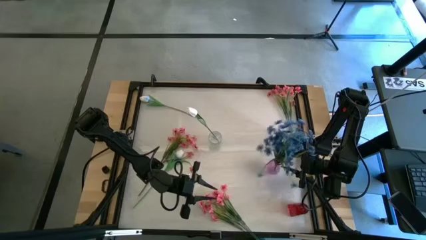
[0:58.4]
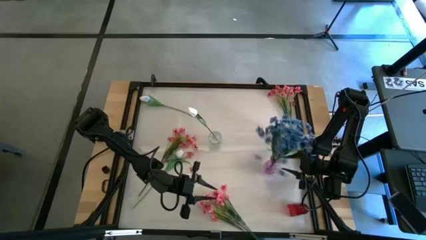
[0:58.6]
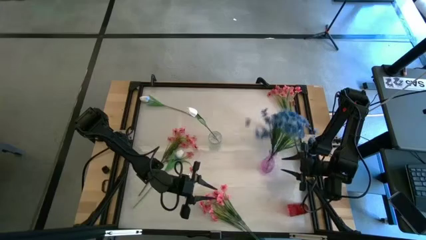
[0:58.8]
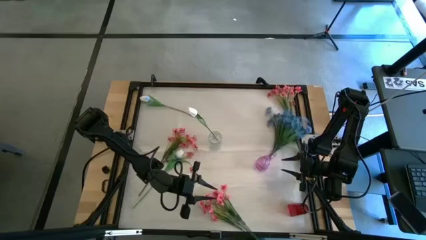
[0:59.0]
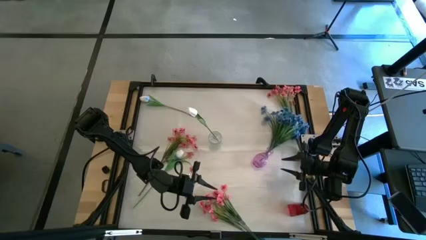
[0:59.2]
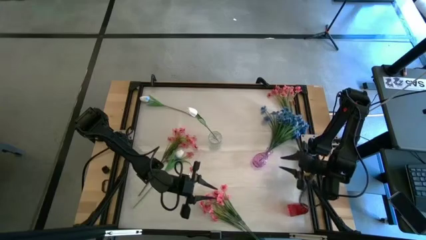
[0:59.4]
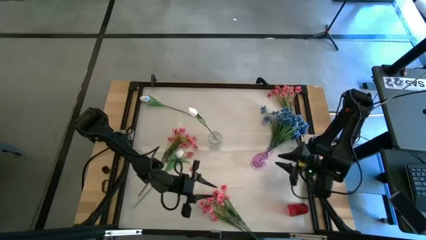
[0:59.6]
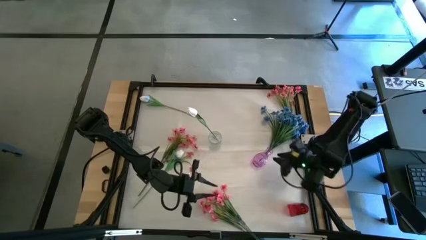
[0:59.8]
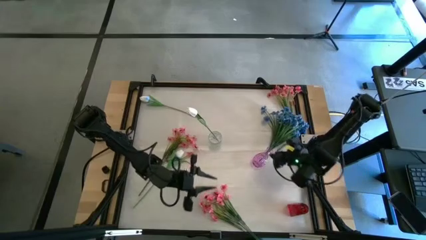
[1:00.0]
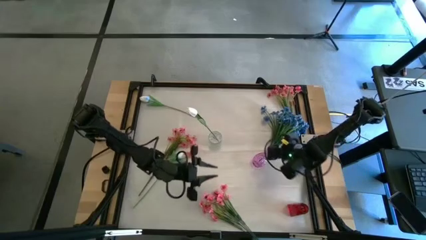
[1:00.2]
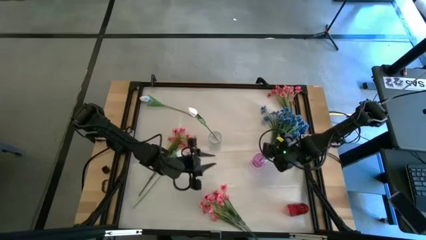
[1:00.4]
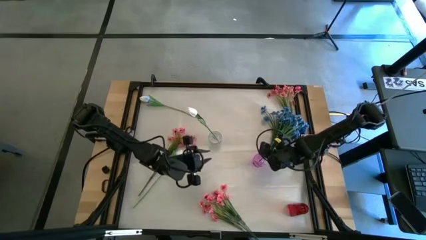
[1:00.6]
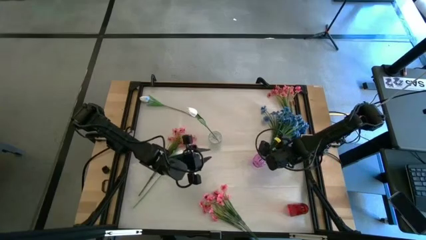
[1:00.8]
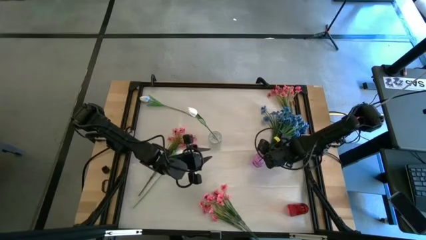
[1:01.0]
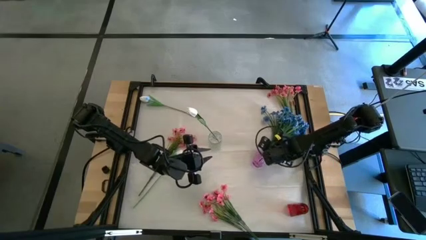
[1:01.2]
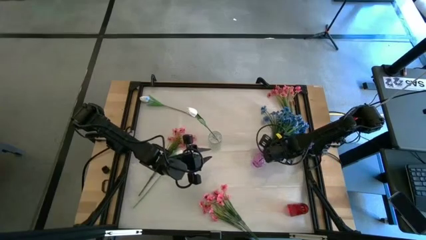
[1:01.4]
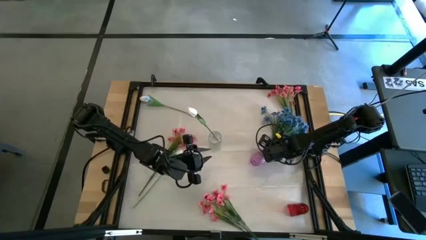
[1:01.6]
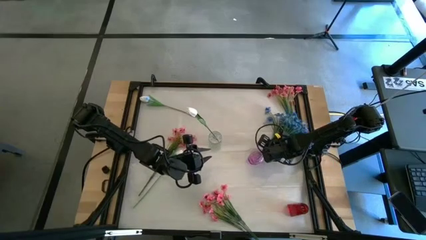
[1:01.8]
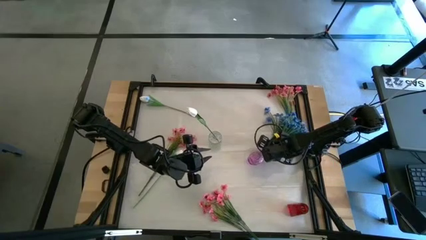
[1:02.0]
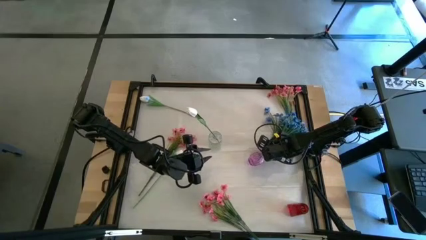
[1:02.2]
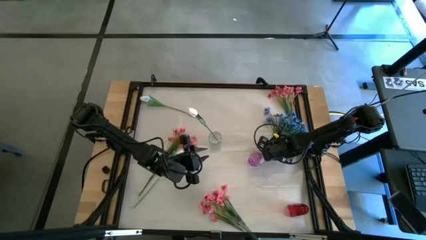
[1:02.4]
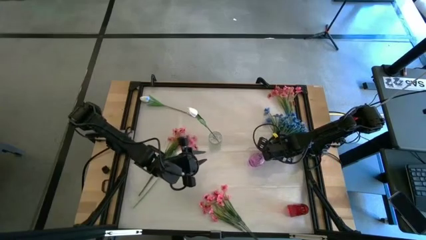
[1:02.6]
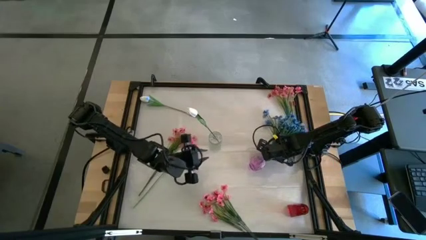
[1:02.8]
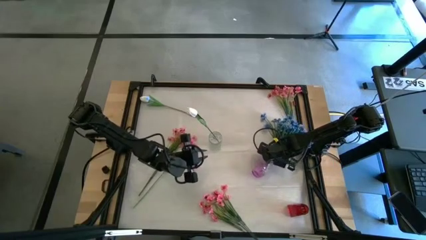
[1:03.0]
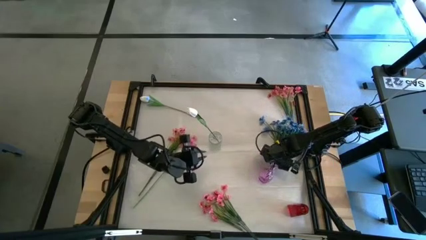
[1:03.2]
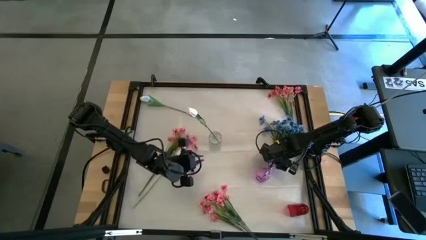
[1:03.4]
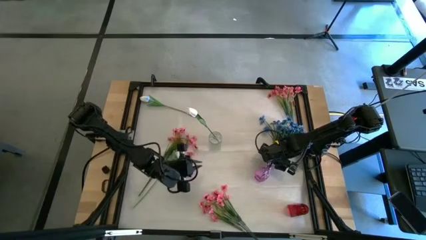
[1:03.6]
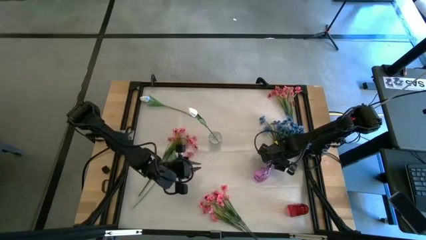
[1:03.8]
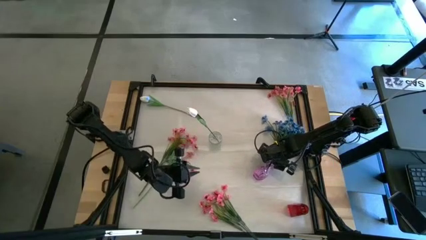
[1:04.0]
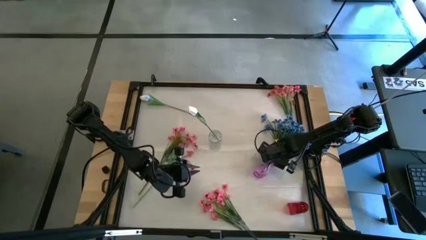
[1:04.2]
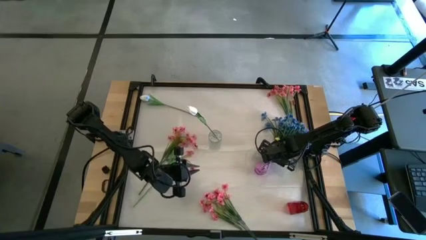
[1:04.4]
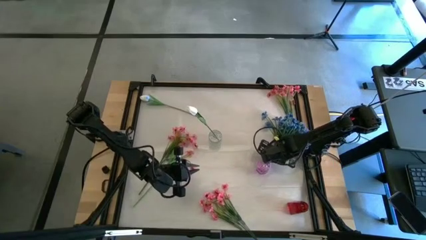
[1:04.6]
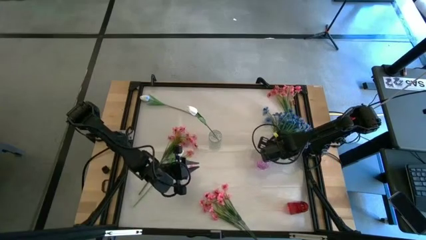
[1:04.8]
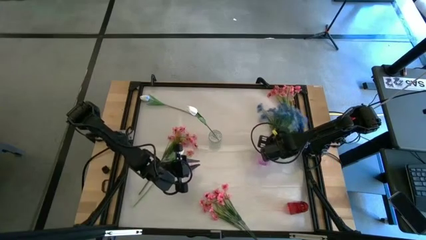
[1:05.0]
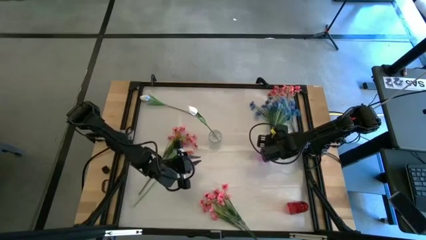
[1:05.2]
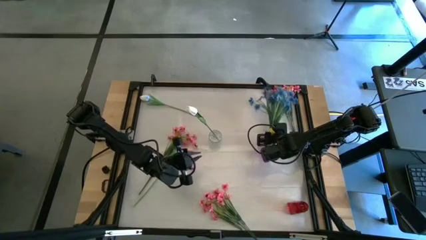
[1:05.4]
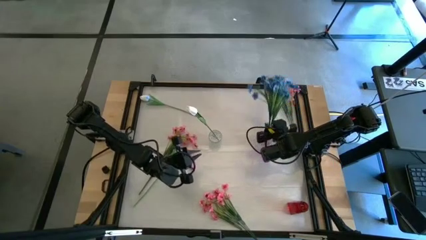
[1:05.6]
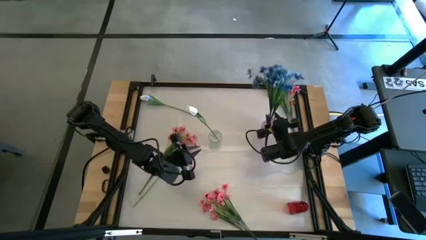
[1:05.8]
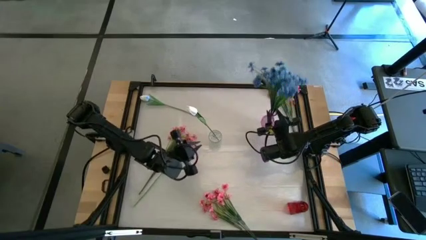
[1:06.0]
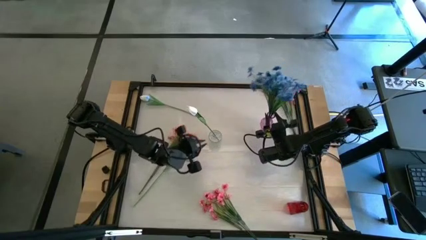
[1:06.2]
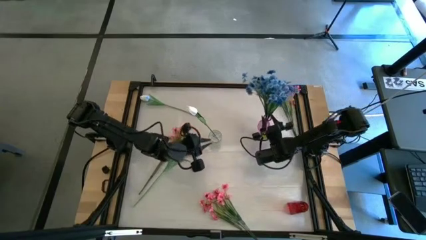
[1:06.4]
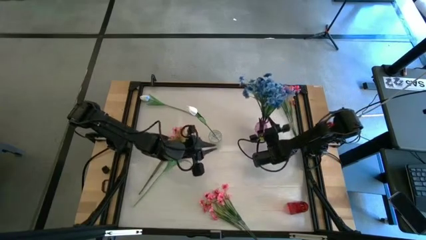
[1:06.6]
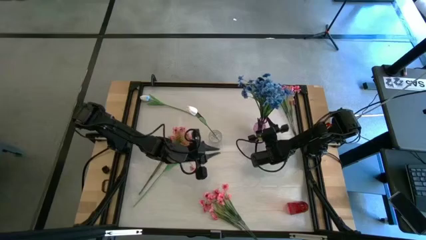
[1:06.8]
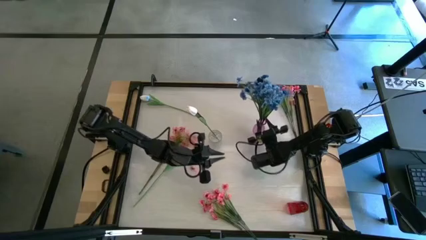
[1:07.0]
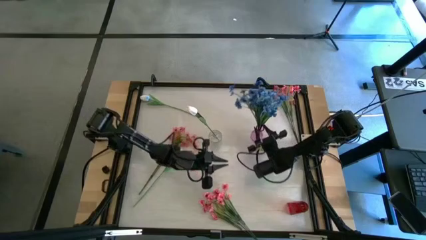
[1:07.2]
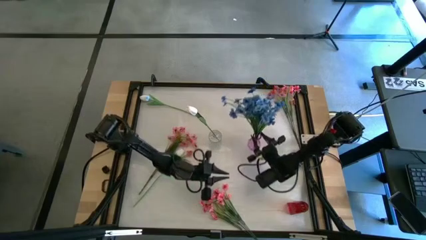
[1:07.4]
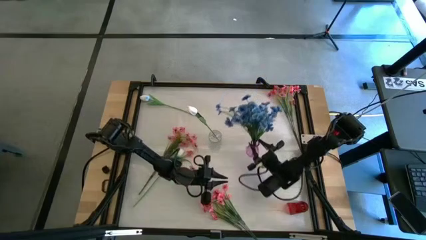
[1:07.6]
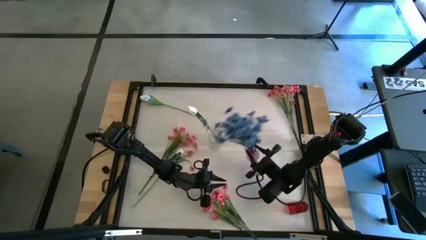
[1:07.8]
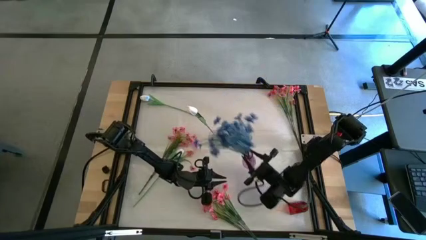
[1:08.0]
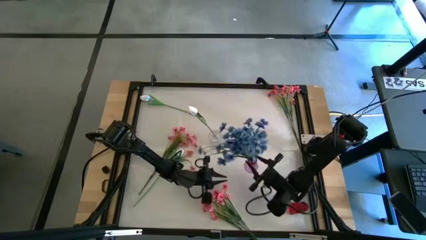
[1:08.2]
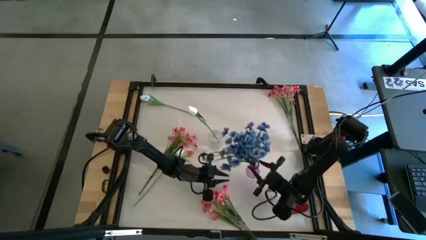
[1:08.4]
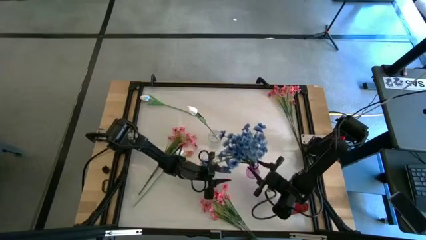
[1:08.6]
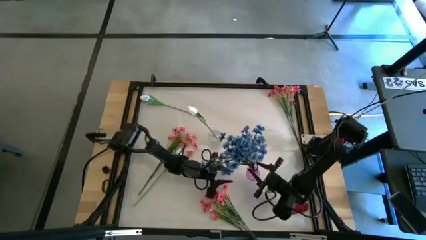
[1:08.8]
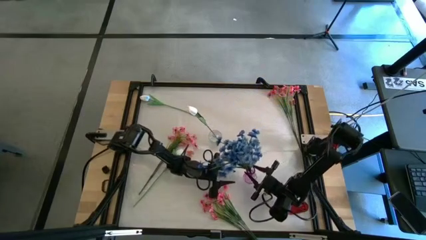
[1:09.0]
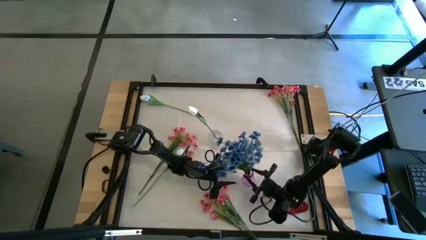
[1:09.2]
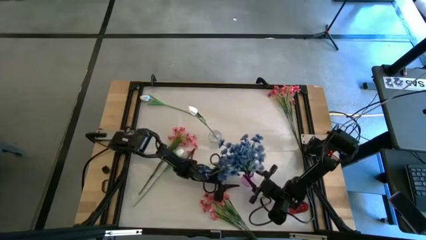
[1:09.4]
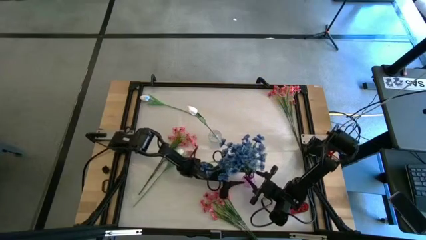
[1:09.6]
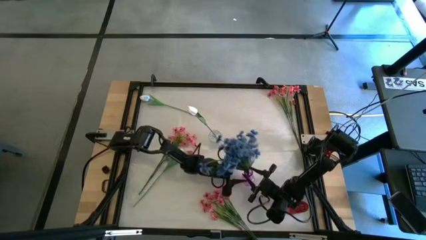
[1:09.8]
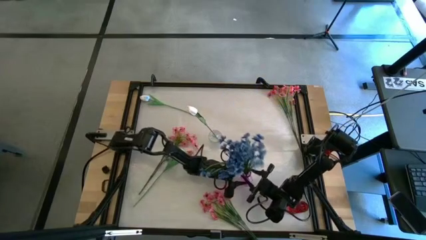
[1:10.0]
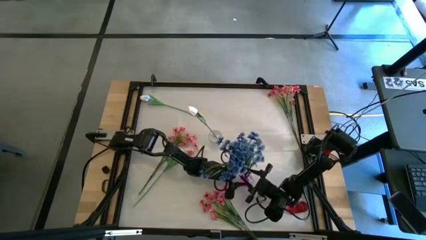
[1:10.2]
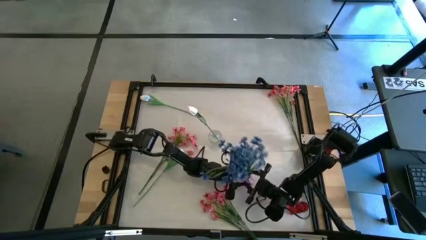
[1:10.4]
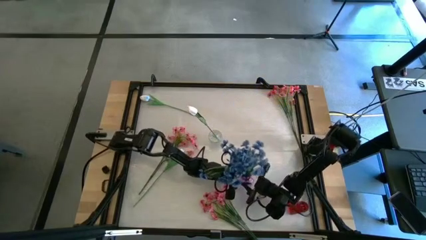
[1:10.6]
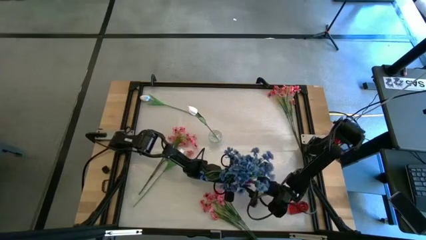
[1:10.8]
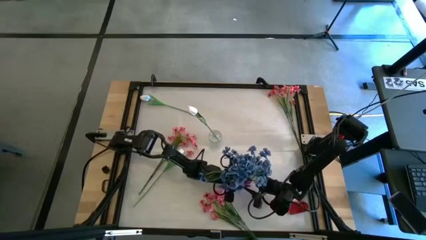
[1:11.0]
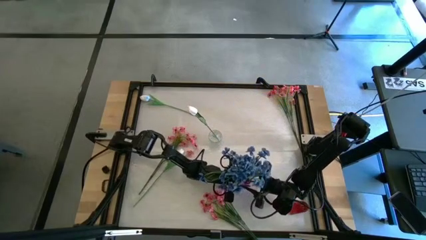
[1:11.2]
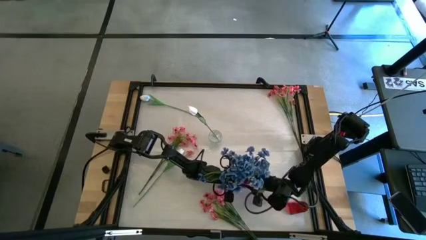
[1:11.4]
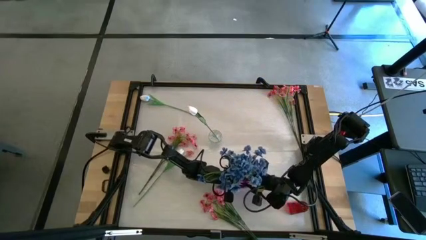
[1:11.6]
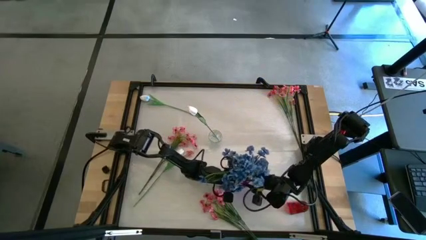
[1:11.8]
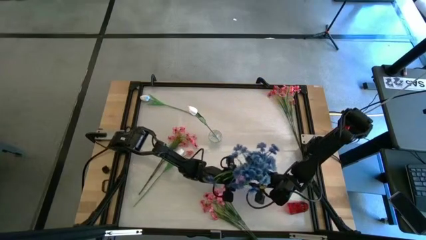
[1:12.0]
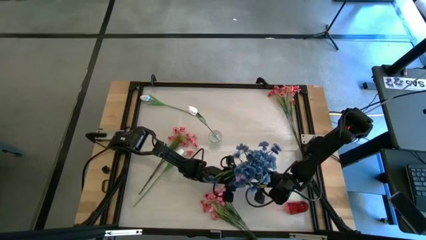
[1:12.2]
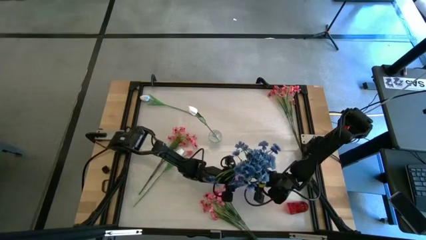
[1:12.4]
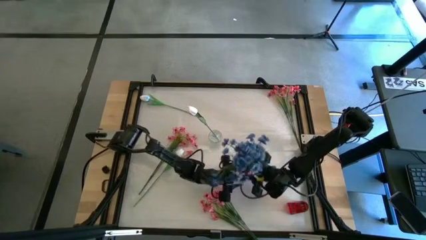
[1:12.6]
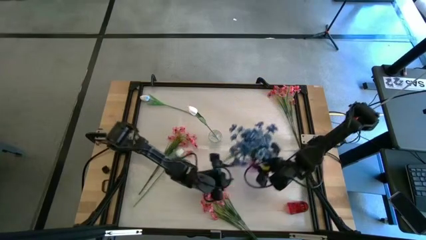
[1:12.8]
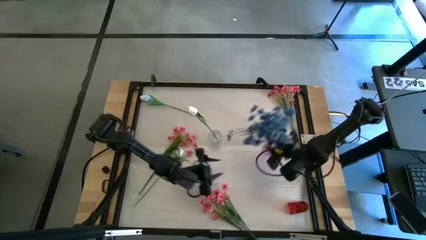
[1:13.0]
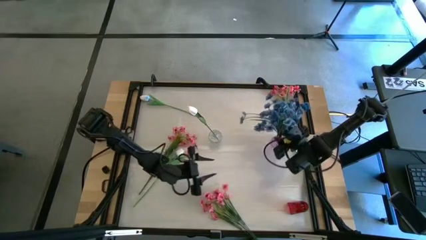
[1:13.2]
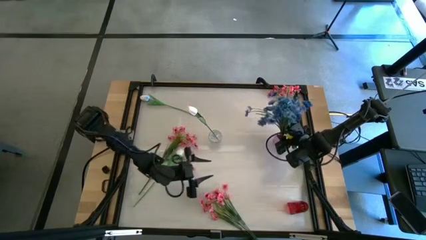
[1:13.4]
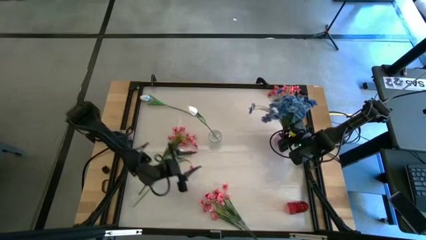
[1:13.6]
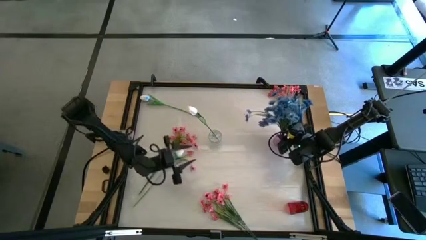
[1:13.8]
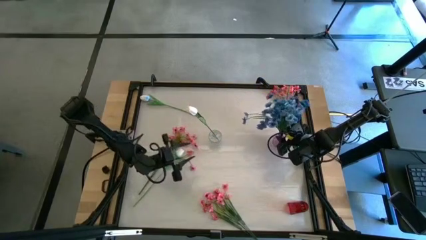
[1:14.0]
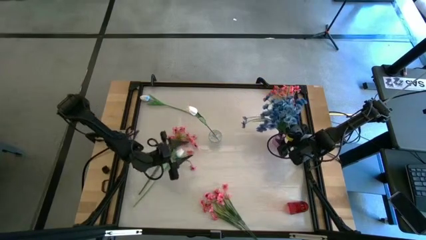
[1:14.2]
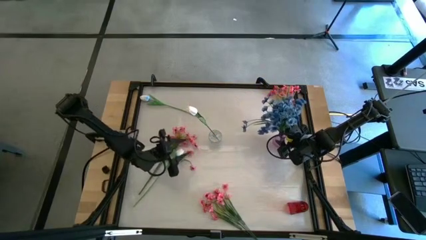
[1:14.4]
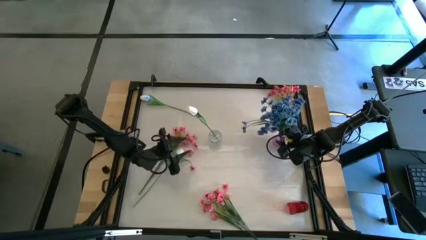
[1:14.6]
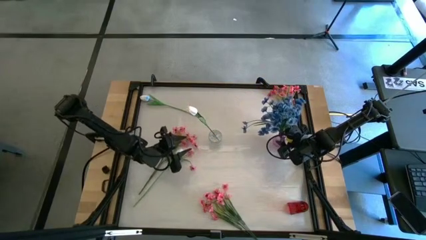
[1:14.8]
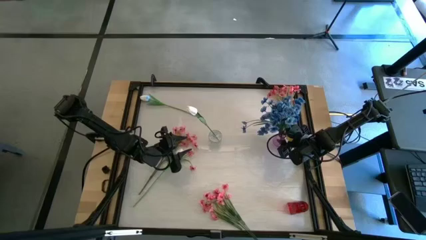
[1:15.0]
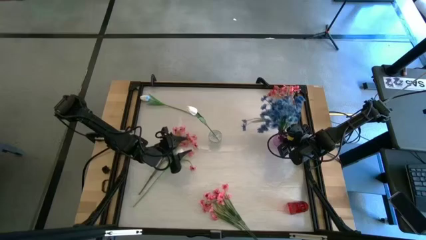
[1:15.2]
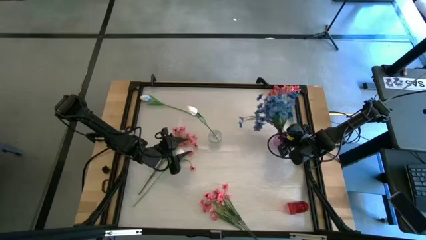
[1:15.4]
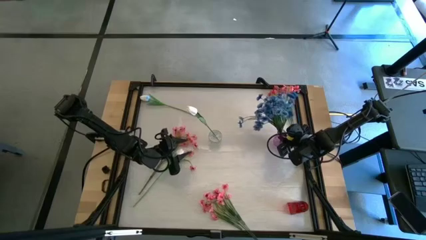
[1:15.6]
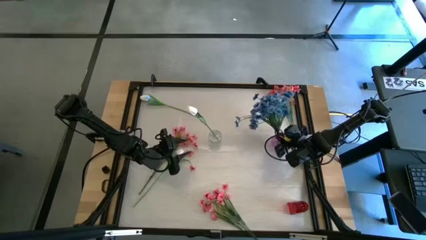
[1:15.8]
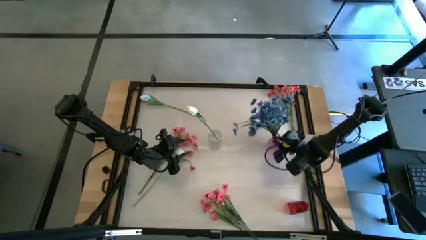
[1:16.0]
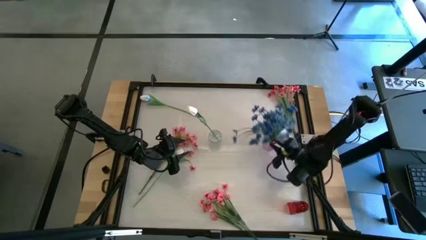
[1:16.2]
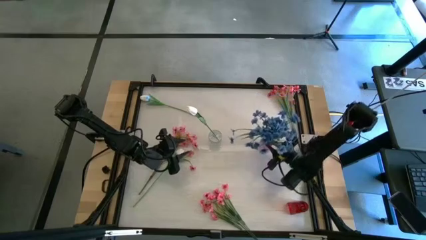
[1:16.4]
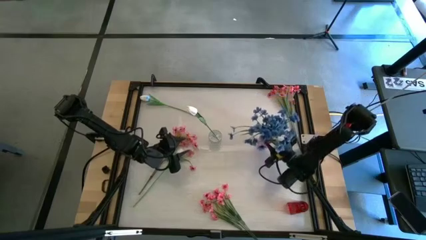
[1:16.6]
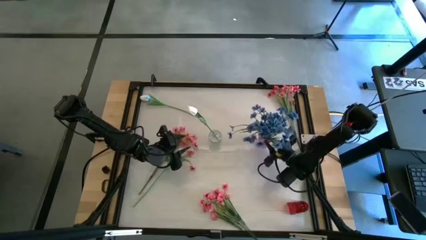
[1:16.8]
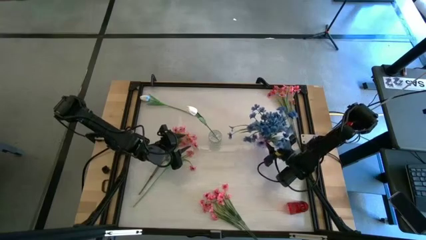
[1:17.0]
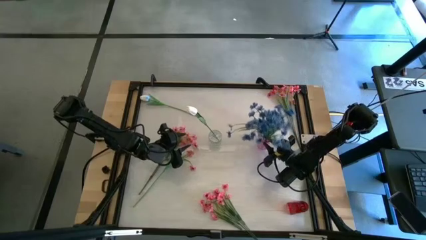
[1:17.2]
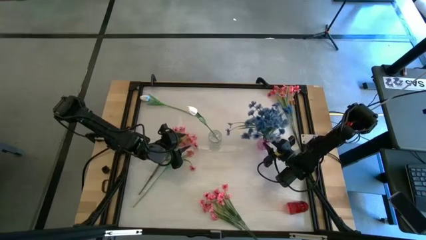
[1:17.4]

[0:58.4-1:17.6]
Task: Sort flowers into vase by color
Adjust the purple vase
